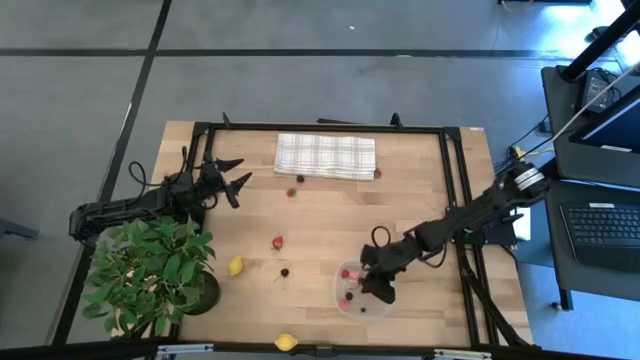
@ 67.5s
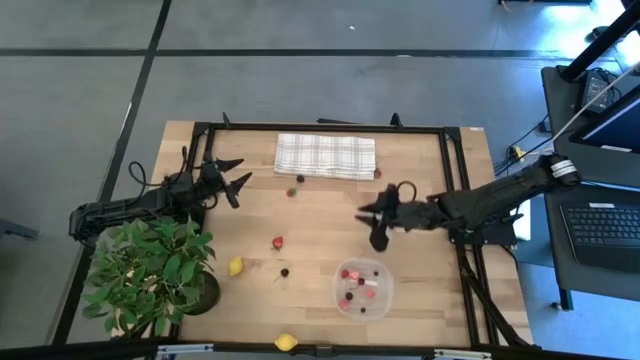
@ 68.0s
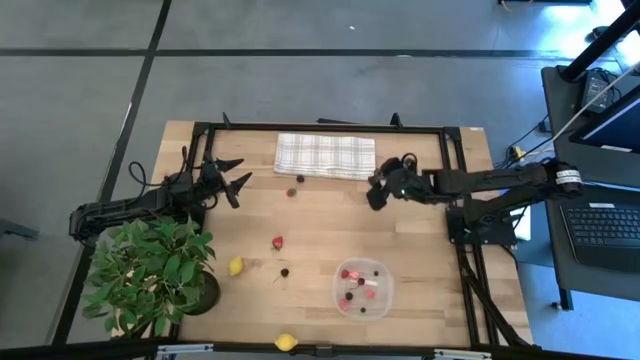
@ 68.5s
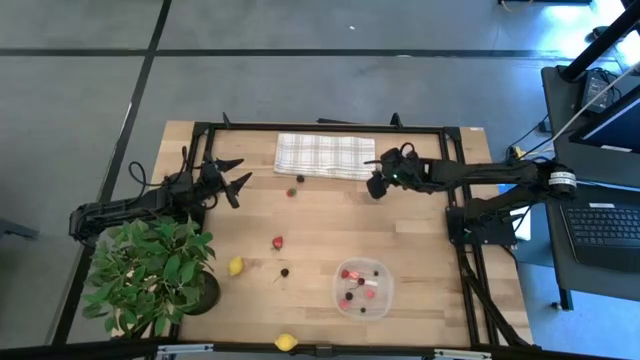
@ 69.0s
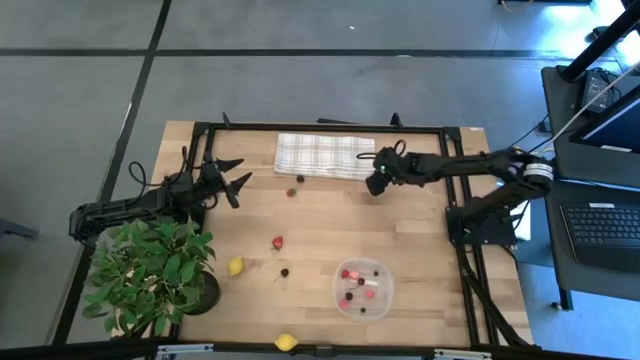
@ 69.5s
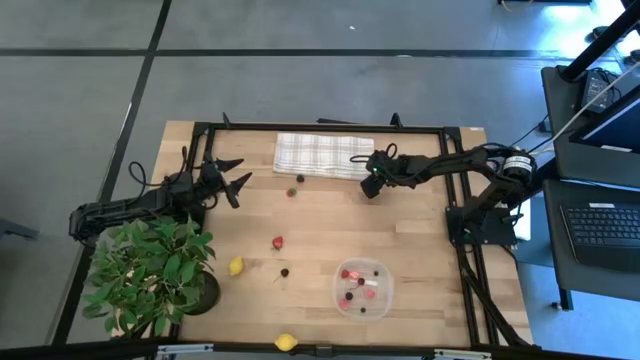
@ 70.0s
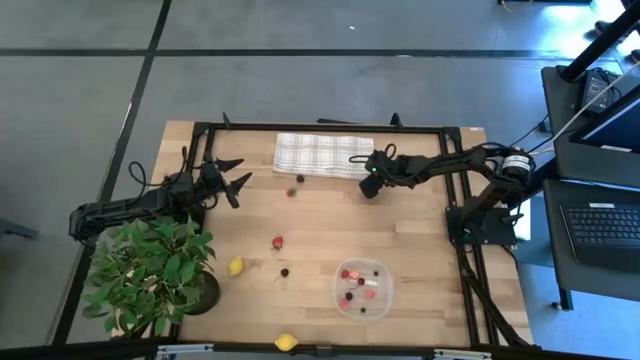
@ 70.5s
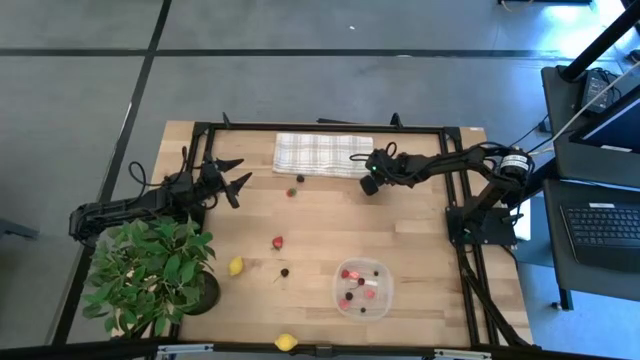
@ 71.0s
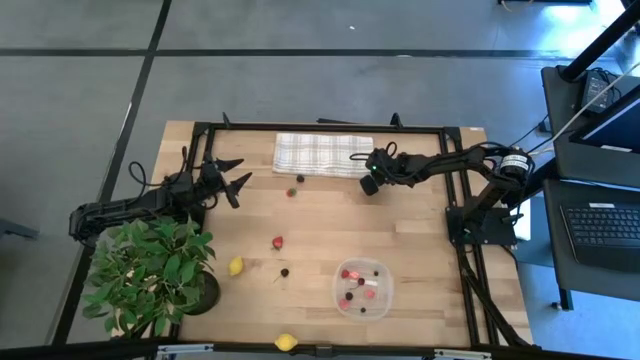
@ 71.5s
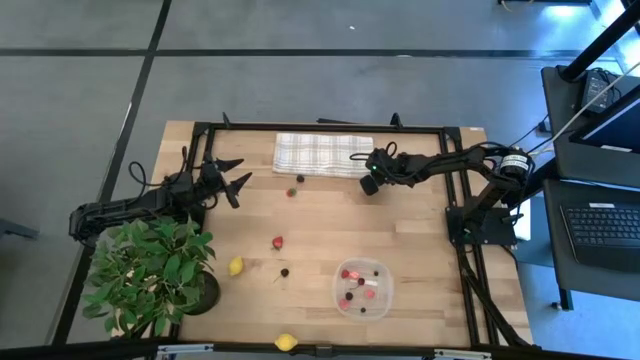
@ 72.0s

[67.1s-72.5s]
Task: Pick and placing Produce into tupperware
Put the top right red strawberry into the transparent bin

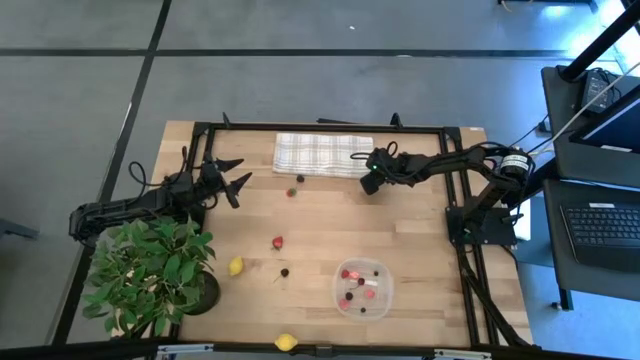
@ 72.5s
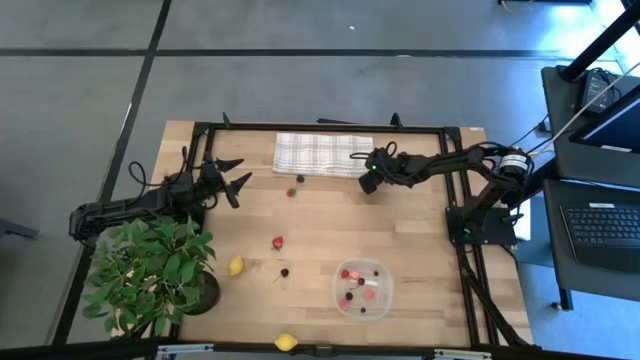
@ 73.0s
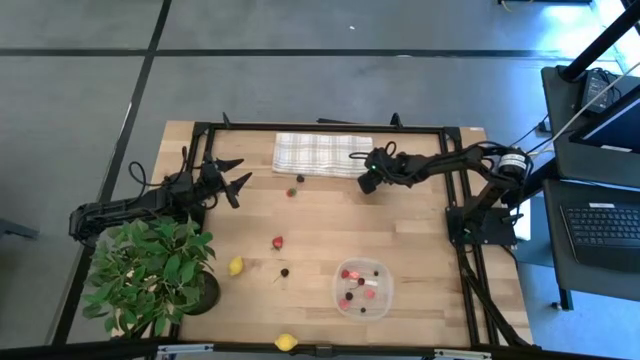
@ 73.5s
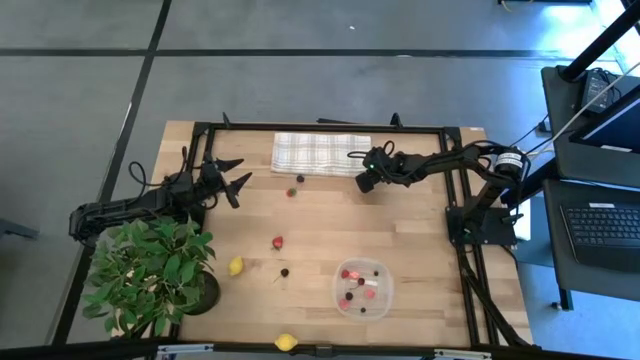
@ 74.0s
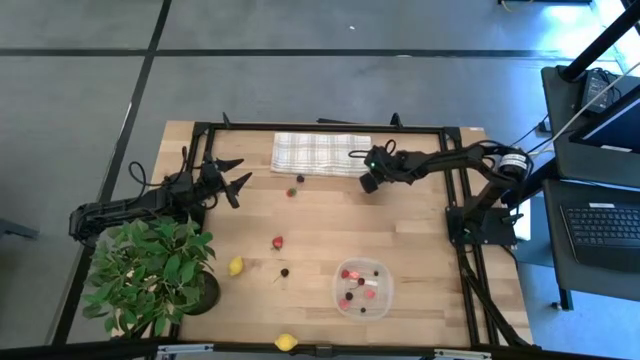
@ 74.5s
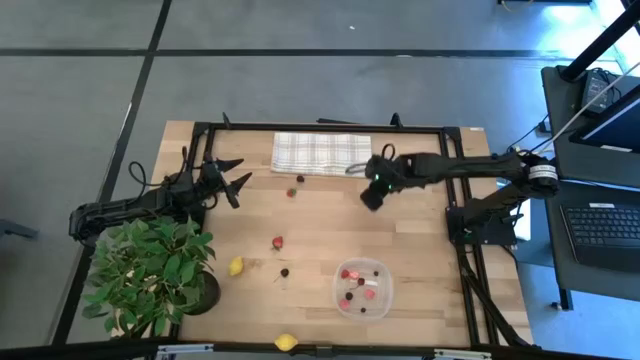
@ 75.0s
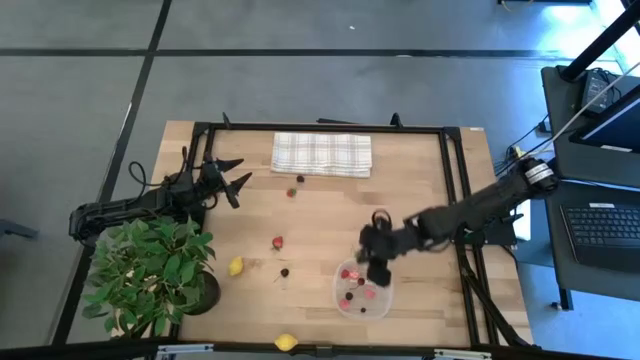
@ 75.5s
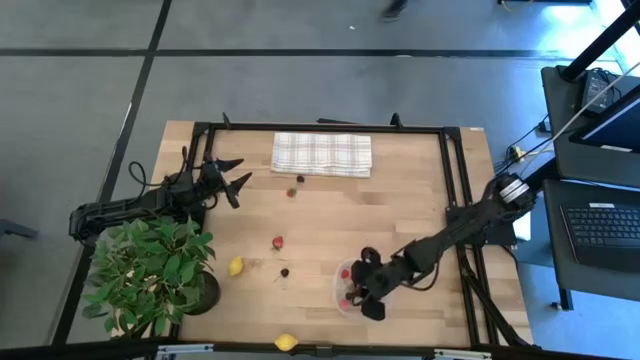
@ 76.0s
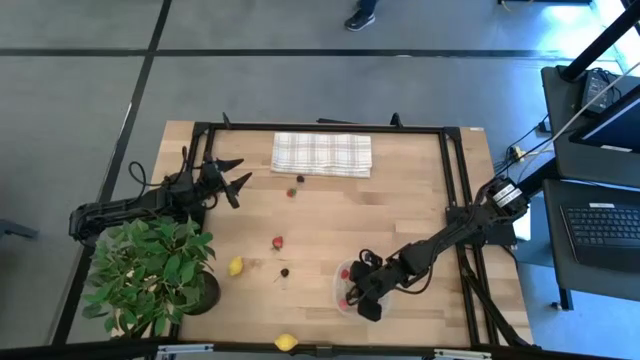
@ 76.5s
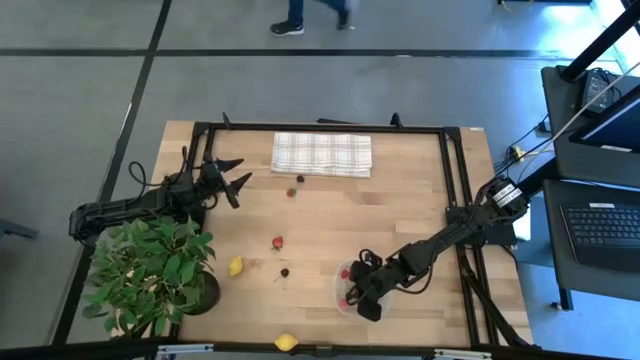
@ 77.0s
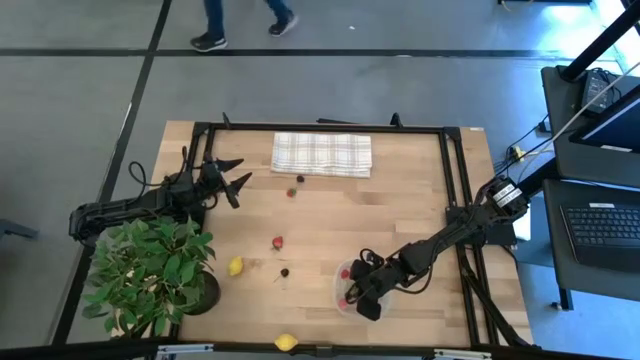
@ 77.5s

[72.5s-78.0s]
Put the top right red strawberry into the transparent bin

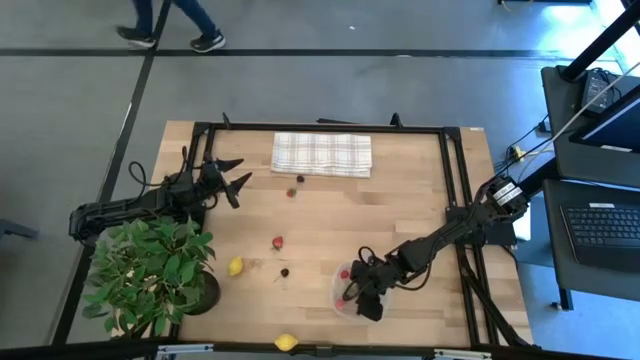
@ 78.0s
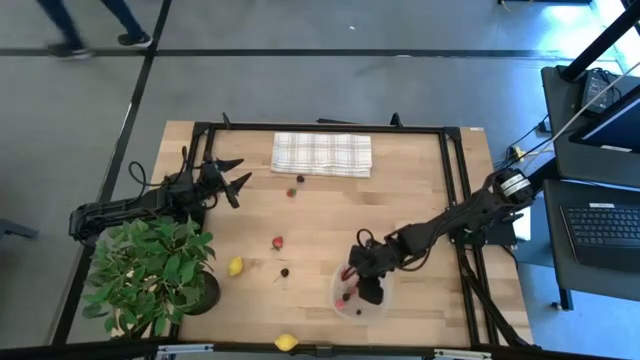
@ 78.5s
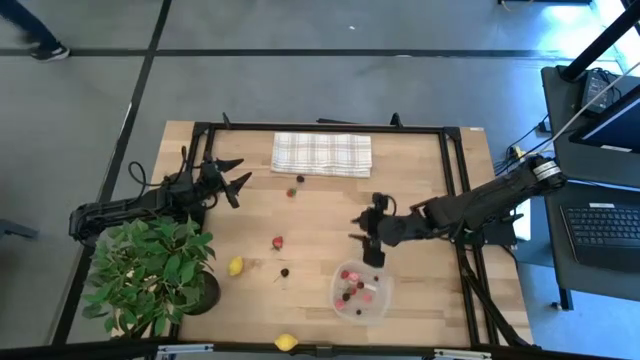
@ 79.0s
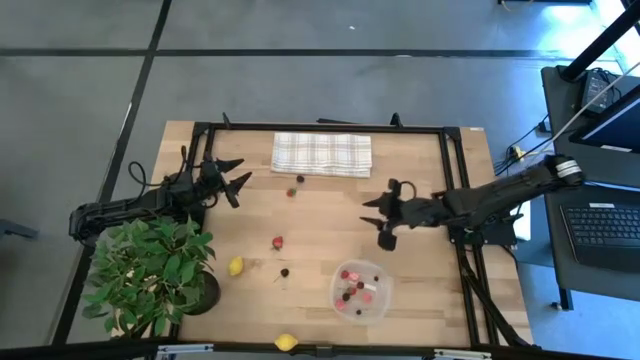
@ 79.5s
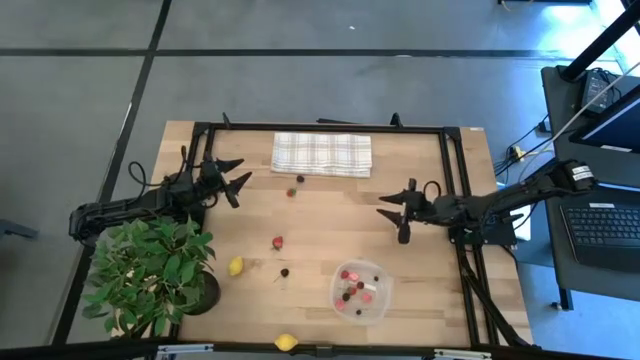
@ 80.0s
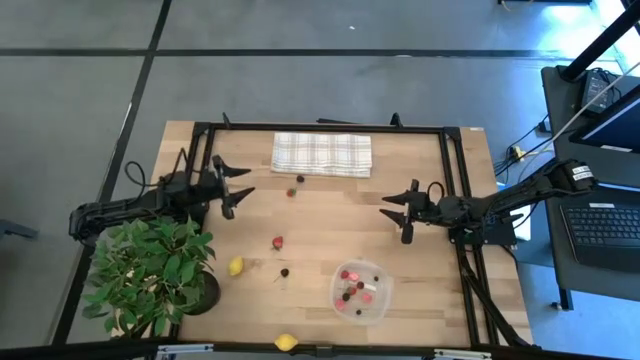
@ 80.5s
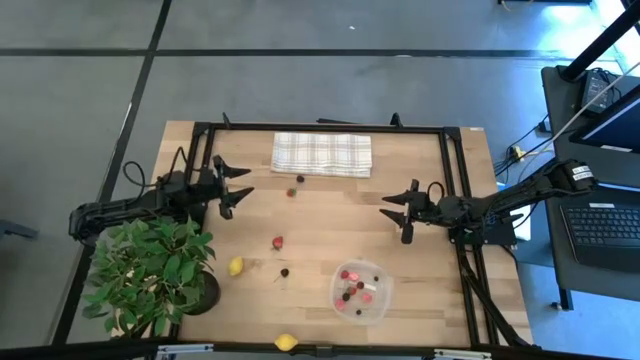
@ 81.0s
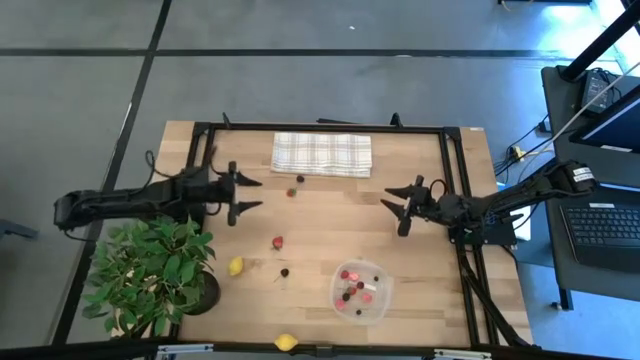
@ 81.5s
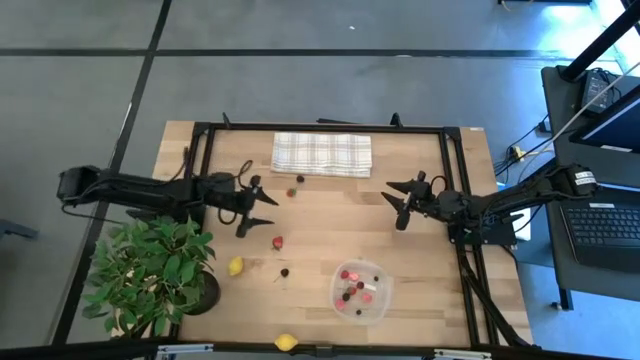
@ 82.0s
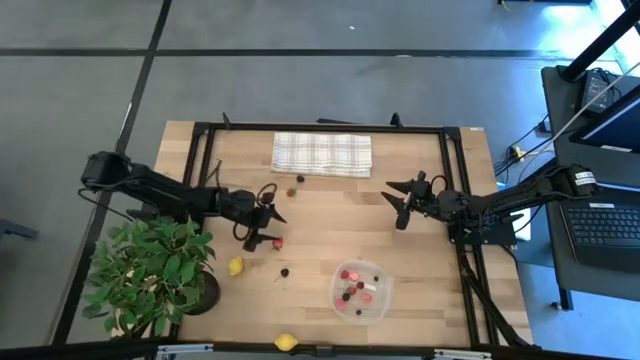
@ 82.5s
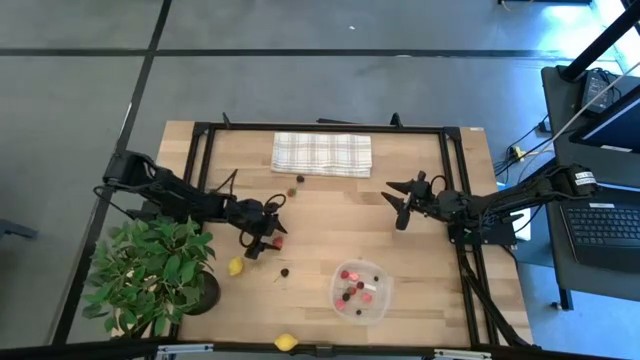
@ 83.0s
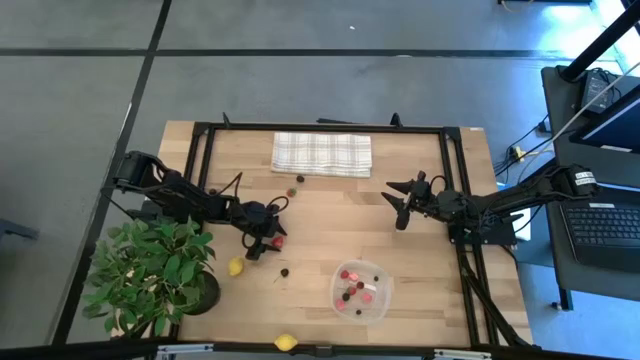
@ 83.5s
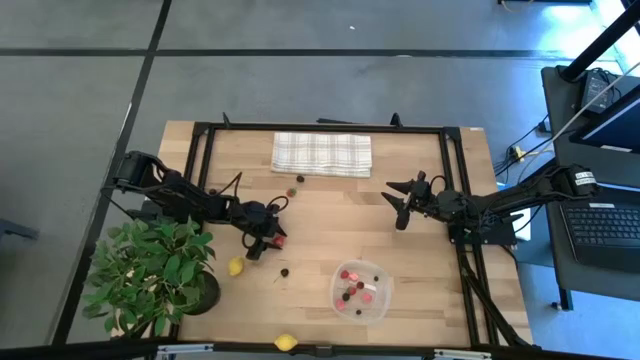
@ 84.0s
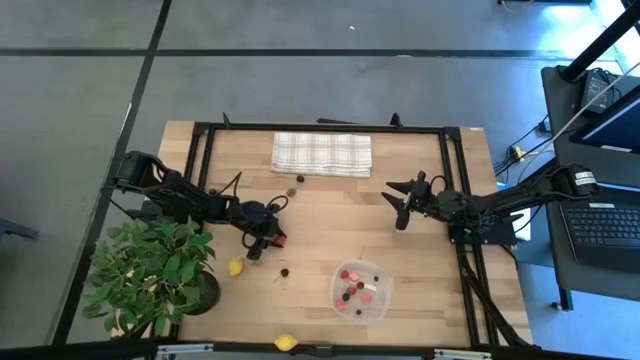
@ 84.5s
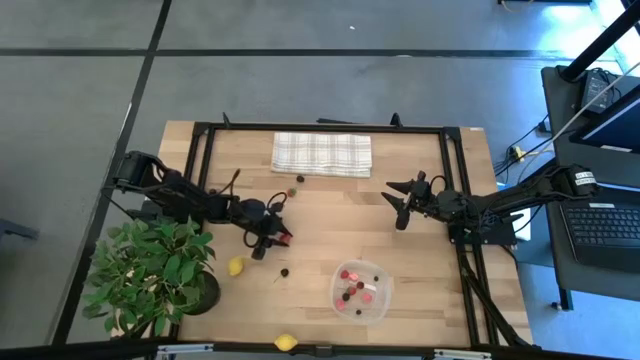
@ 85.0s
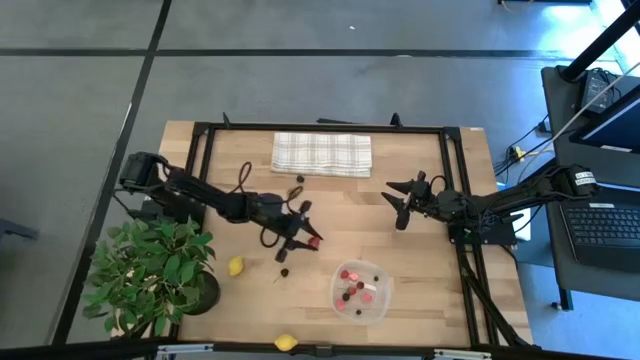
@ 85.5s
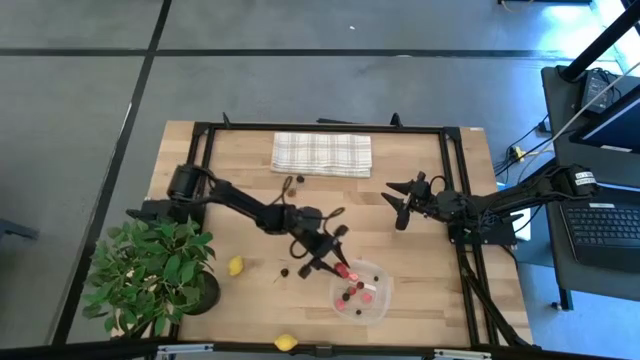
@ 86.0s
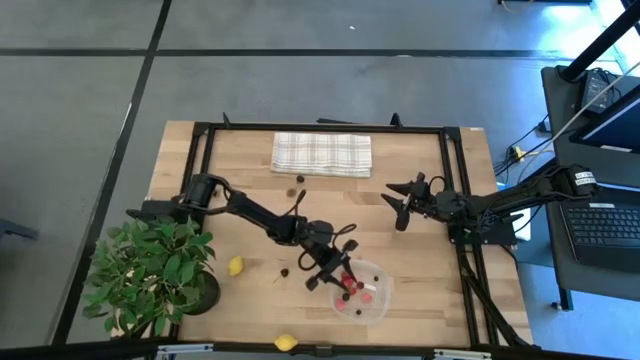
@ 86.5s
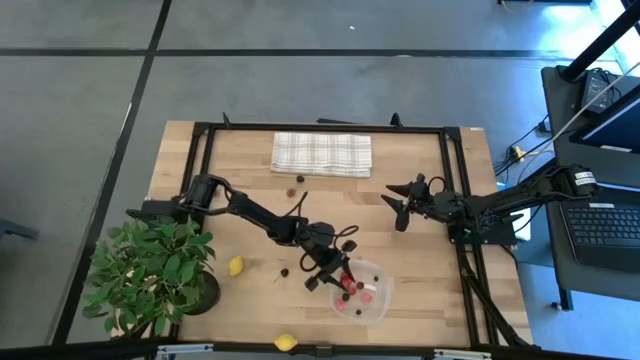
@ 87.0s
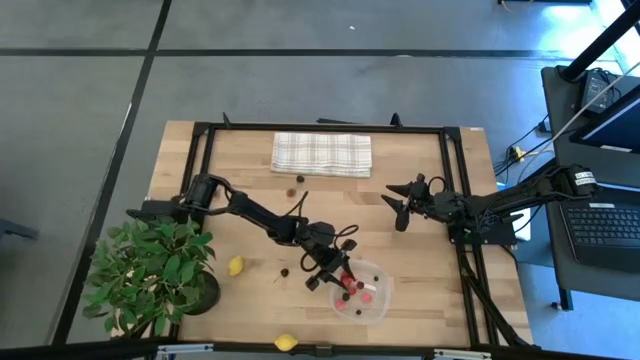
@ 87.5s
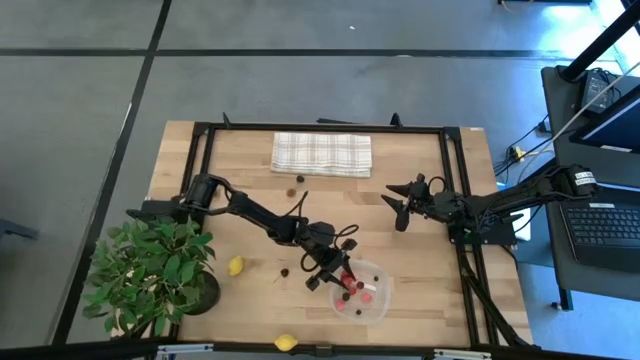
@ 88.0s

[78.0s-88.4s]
Put the bottom red strawberry into the transparent bin
